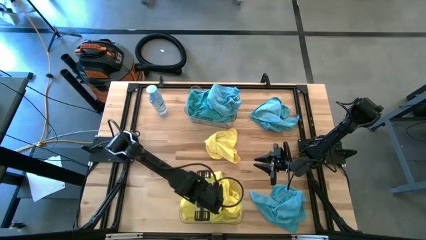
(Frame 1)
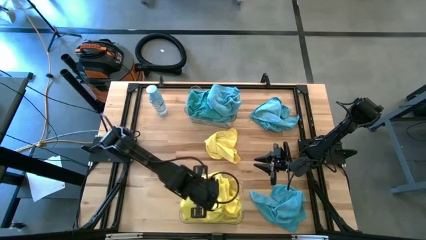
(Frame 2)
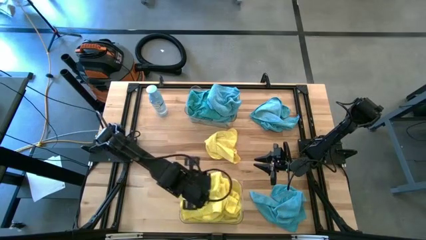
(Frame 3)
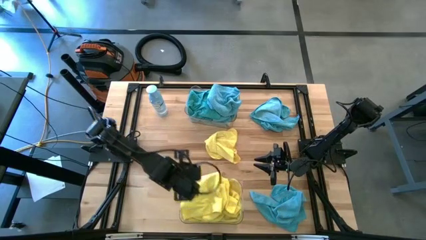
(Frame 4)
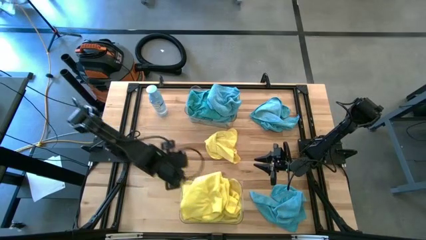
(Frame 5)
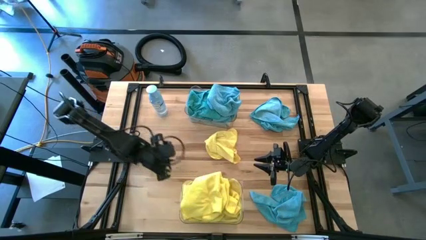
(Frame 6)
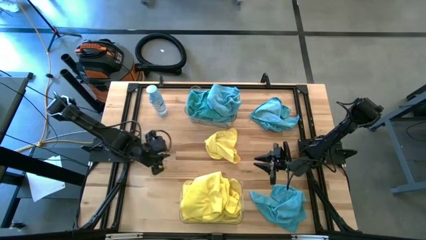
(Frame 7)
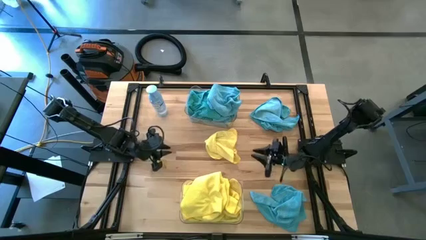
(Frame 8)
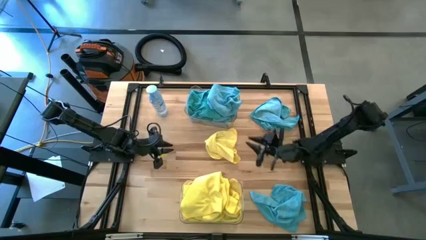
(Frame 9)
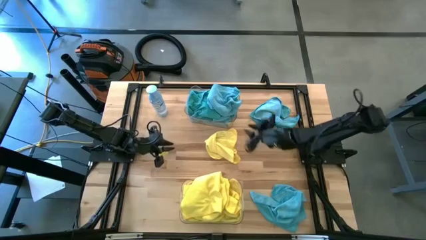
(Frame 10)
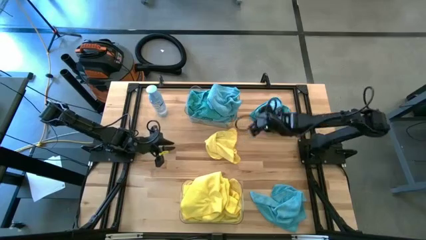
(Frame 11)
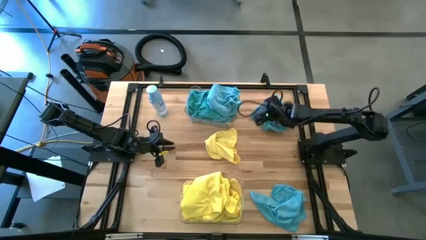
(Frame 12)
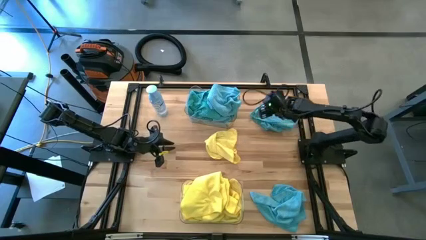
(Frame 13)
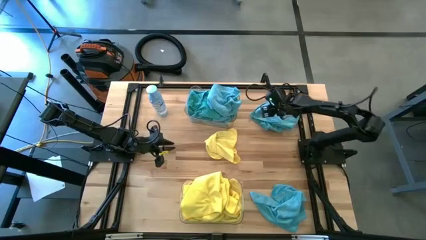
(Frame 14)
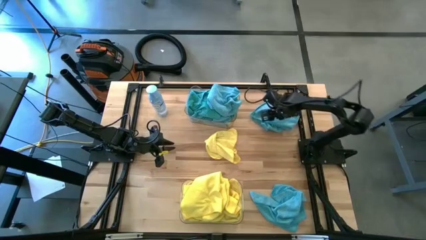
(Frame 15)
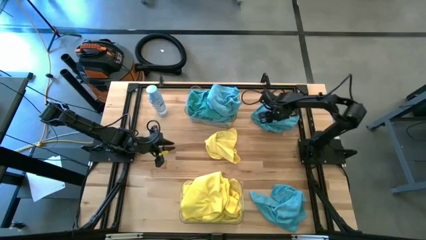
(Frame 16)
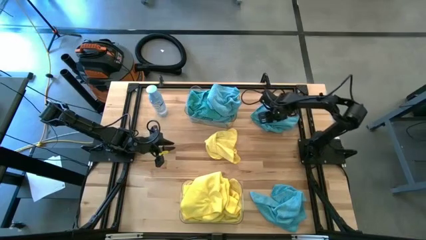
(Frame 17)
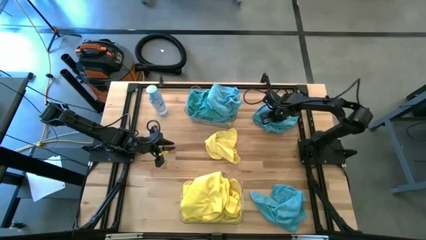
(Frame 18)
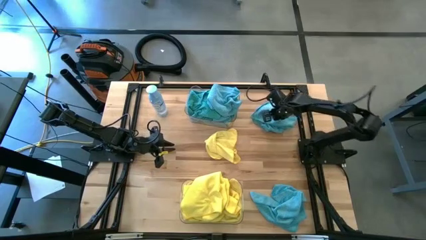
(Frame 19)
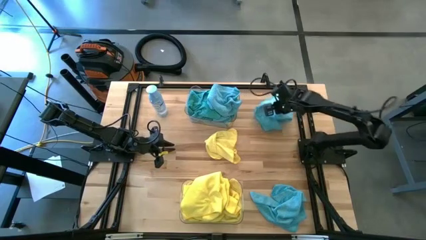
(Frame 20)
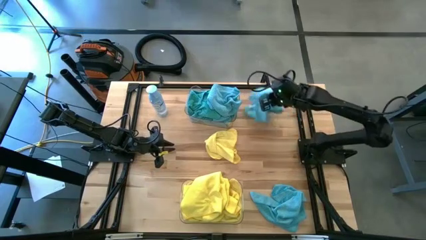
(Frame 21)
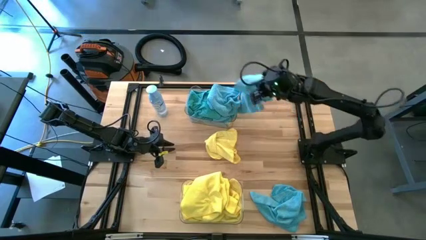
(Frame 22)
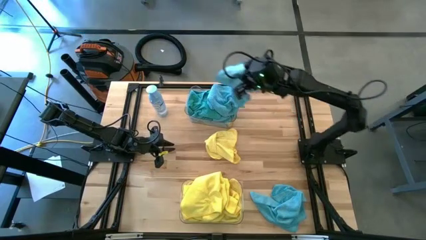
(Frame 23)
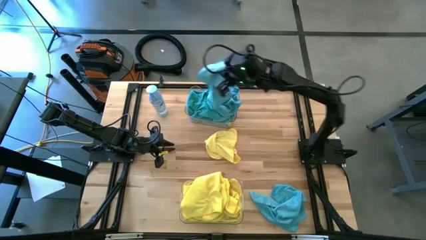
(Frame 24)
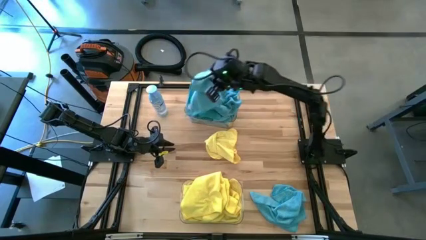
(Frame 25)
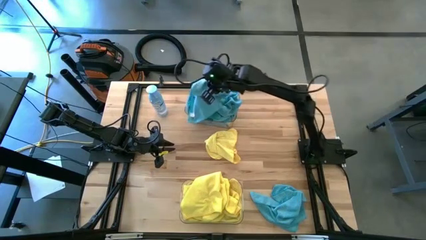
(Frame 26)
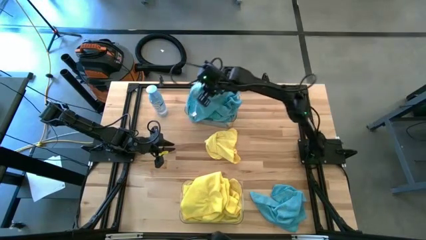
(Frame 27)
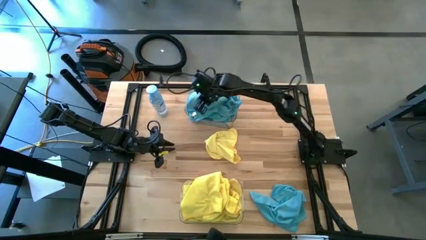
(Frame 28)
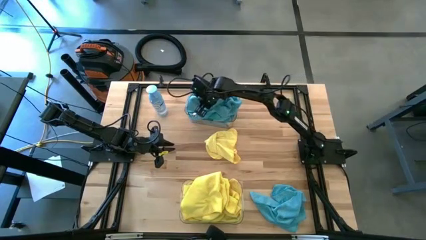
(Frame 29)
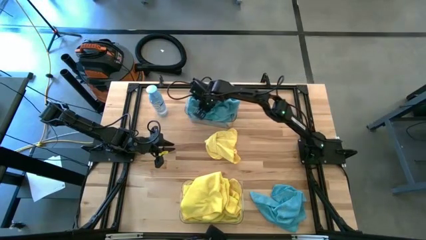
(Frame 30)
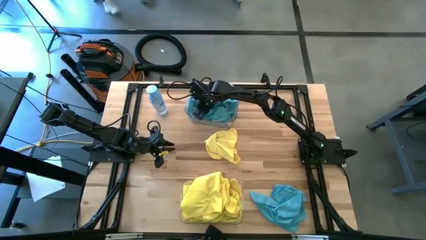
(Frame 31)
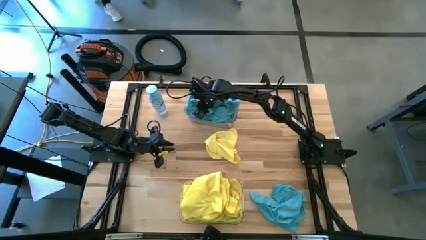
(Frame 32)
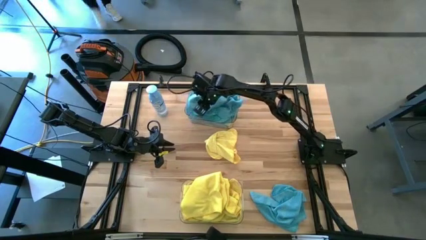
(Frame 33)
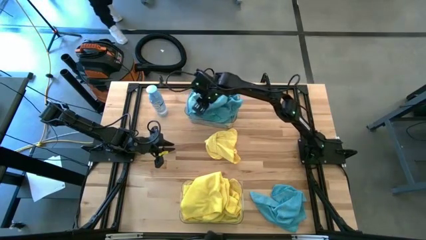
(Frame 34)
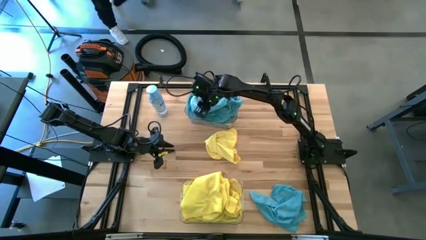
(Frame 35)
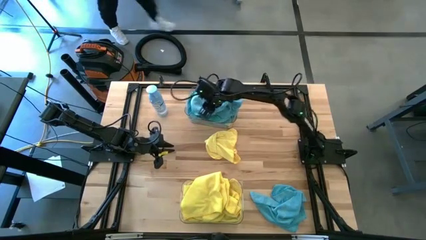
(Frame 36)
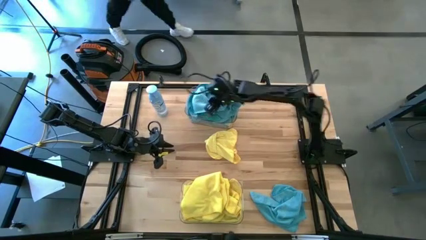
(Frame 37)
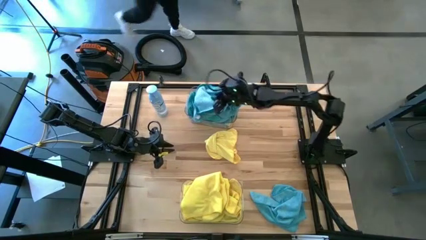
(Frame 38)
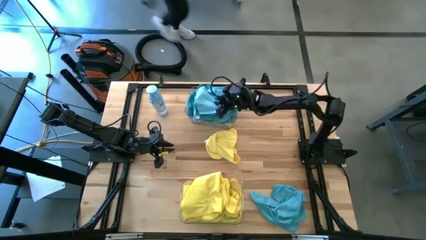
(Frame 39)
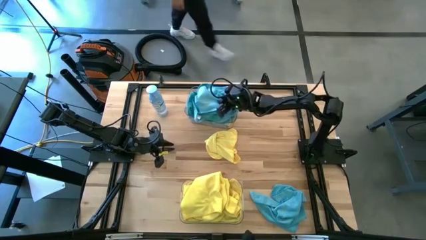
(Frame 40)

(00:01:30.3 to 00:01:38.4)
Task: Sort microfiber towel by color & place in baskets
Put the blue towel into the top transparent bin

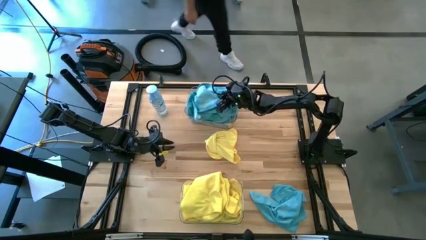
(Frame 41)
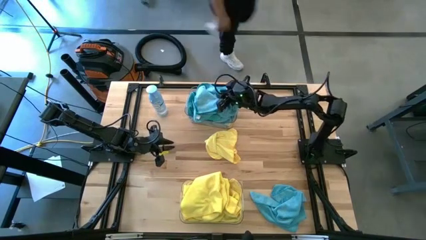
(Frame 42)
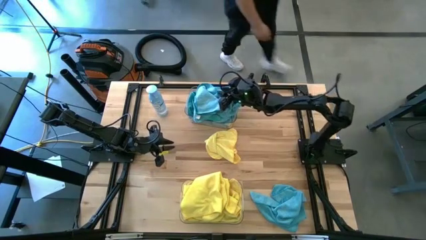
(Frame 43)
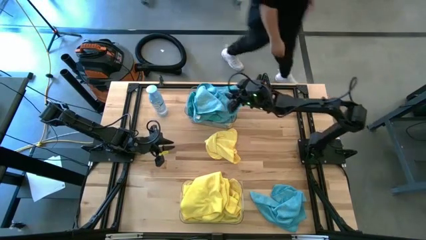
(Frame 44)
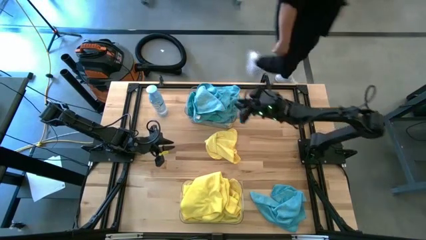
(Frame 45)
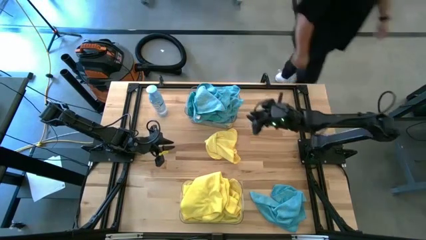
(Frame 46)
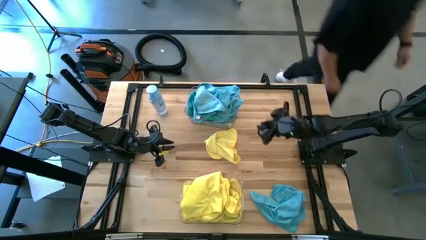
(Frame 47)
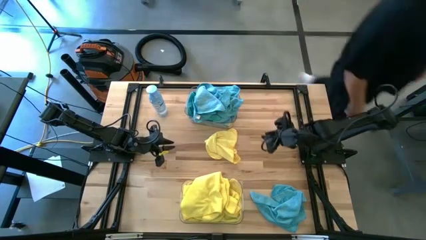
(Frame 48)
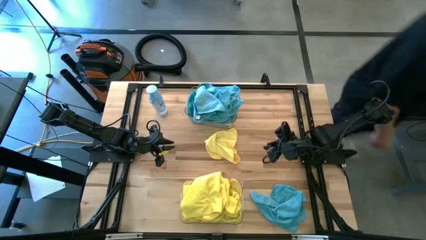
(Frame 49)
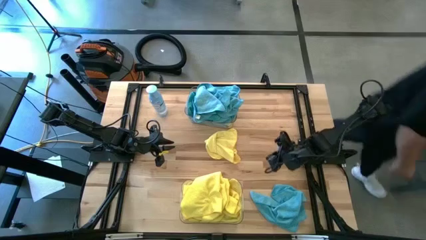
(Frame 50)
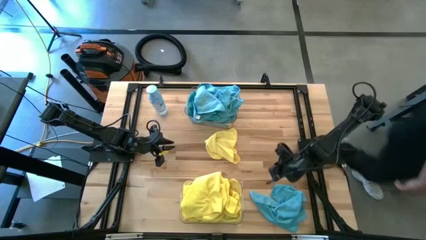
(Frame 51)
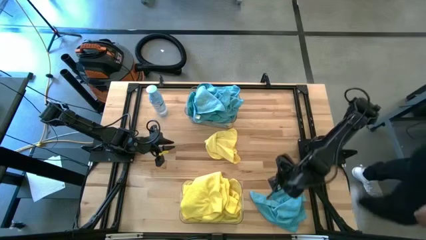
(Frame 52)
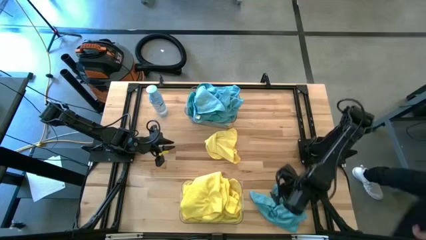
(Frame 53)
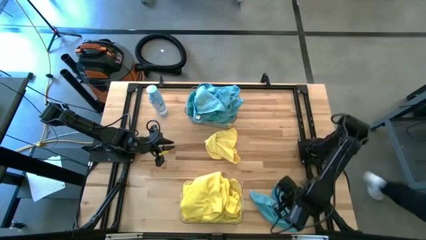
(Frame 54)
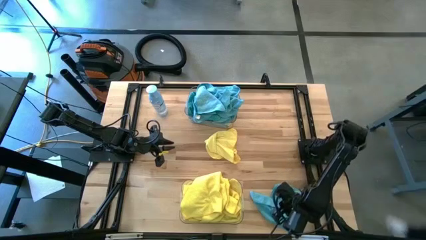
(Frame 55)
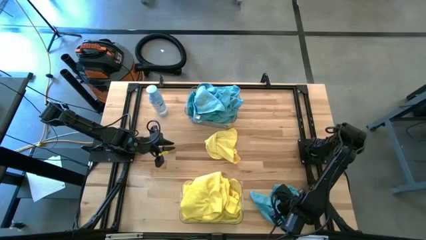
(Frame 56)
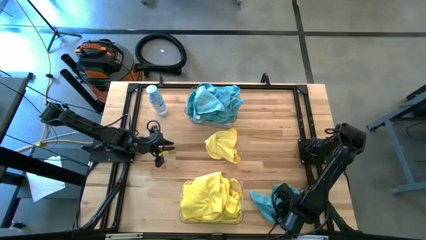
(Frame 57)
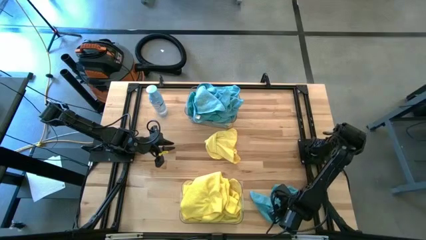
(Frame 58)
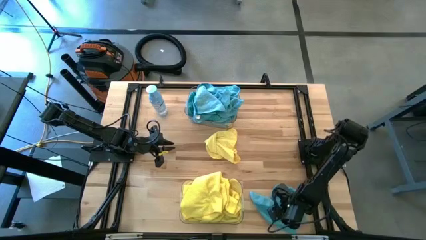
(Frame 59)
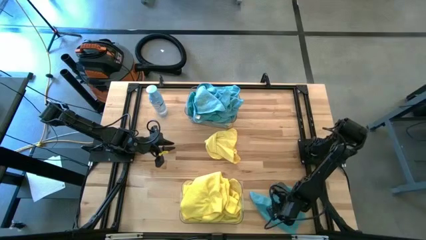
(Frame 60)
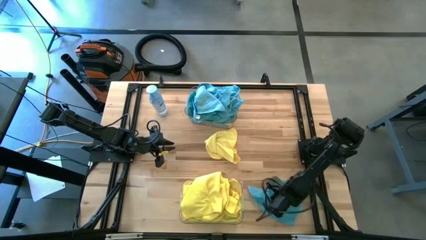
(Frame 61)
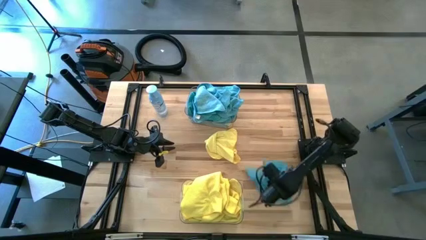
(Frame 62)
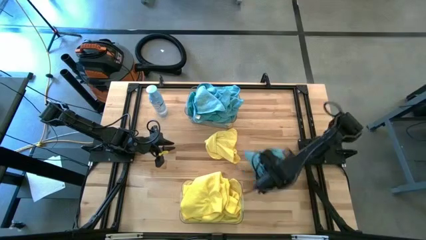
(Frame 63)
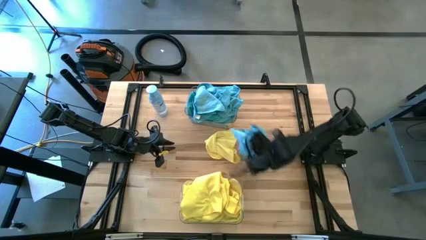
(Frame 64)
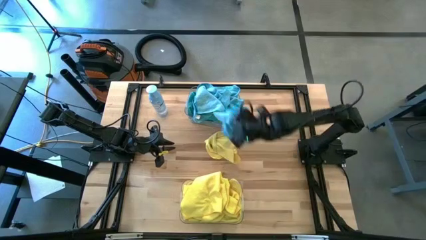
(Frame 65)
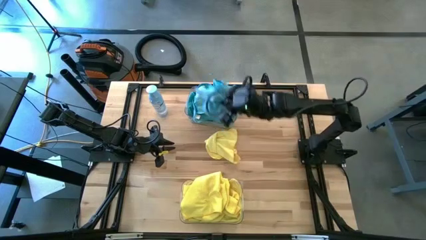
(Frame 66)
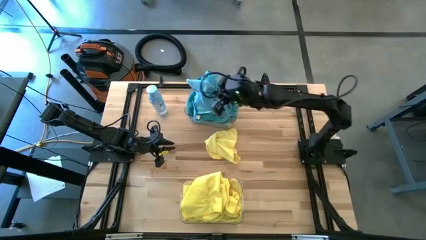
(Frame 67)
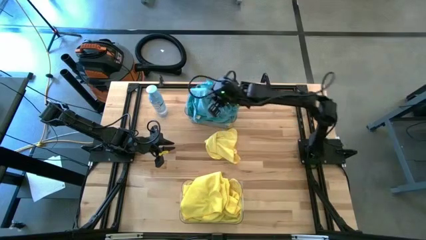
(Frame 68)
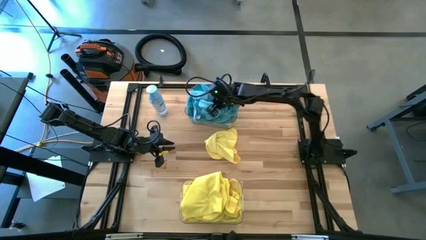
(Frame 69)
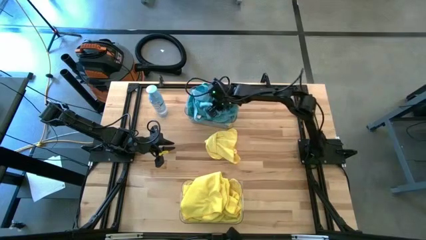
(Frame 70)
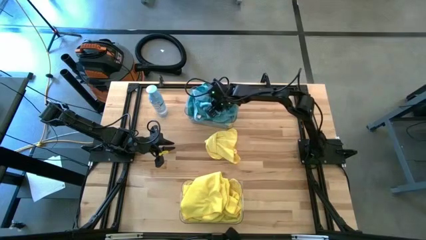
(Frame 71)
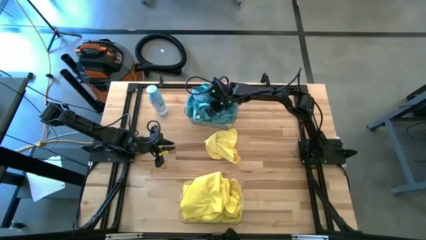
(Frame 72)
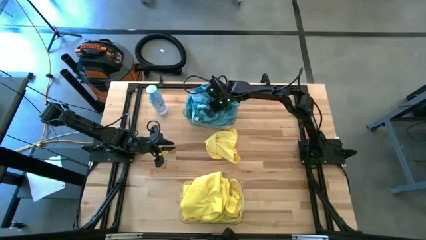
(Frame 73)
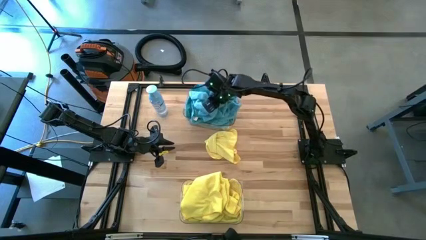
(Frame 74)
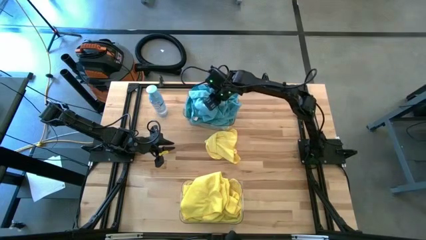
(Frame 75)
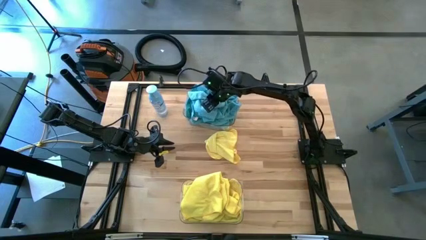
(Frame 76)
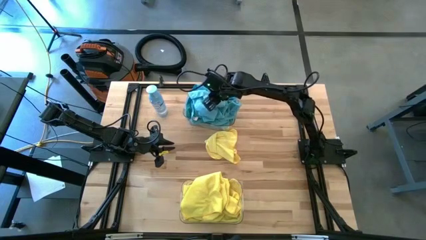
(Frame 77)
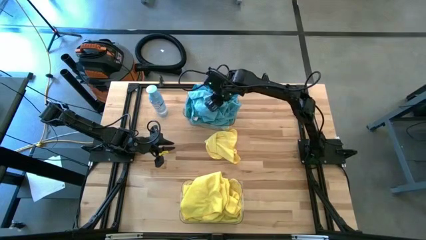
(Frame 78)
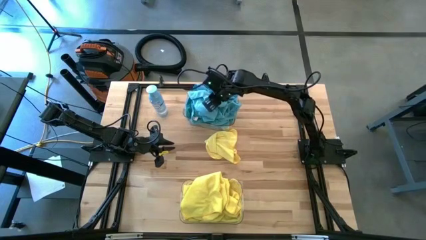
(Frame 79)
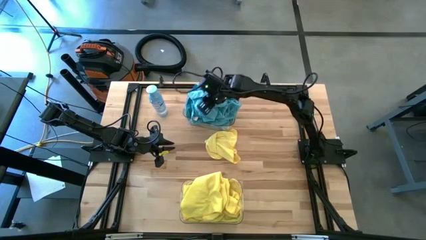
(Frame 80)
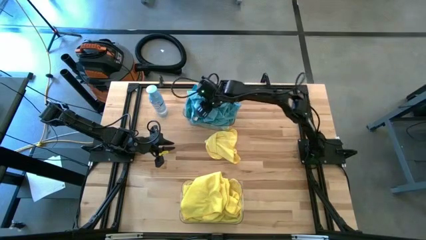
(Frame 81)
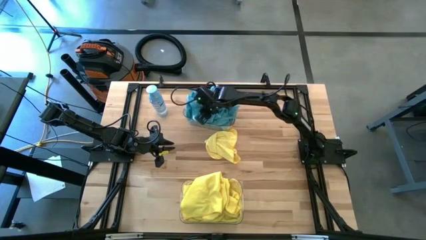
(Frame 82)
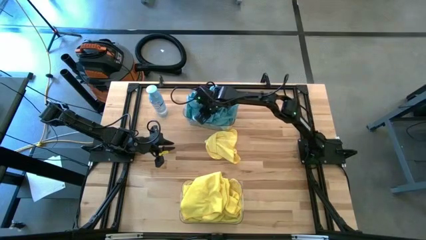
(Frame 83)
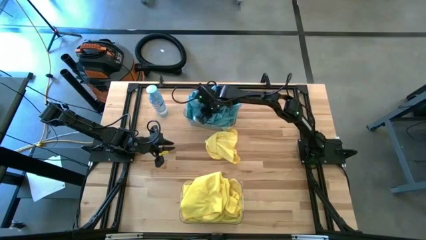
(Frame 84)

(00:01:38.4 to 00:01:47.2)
Put the blue towel into the top transparent bin
